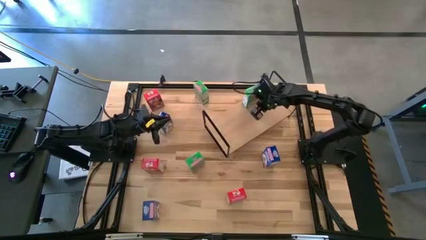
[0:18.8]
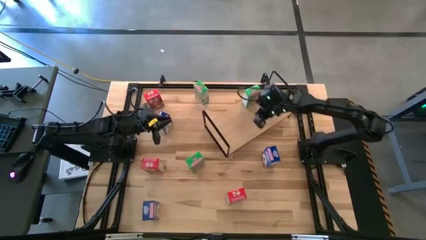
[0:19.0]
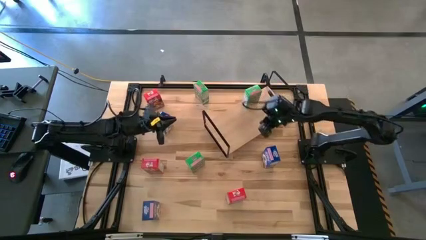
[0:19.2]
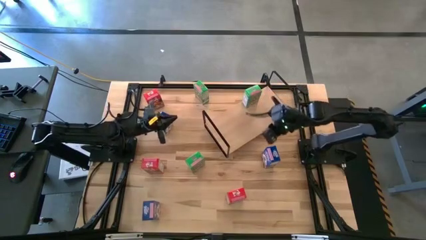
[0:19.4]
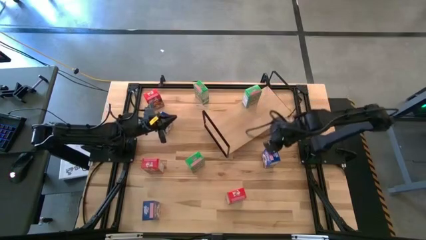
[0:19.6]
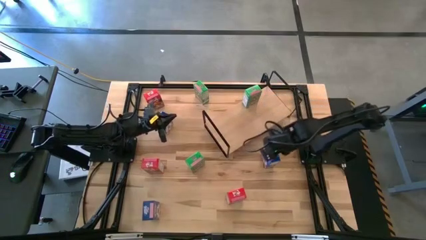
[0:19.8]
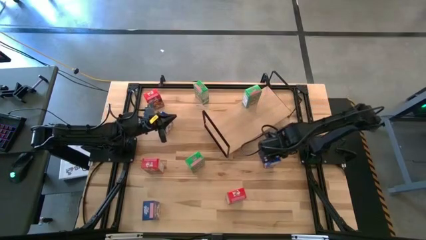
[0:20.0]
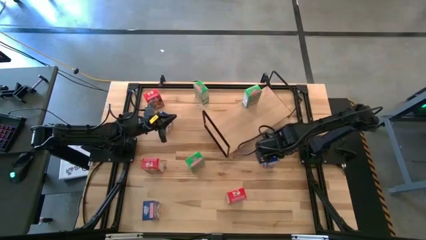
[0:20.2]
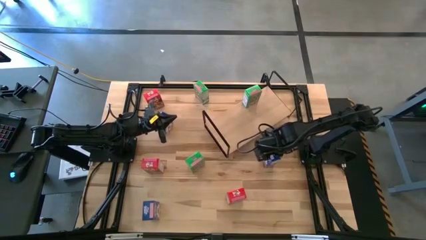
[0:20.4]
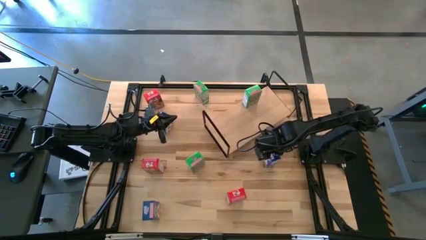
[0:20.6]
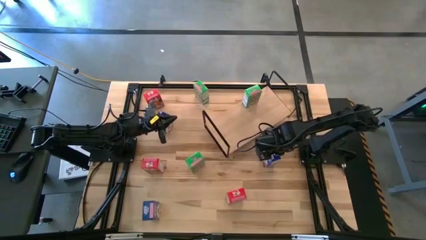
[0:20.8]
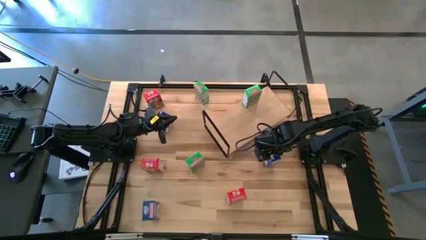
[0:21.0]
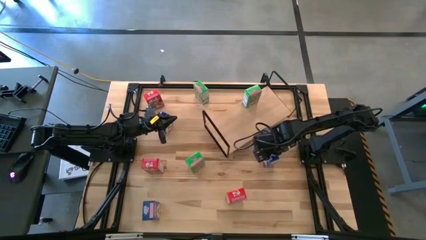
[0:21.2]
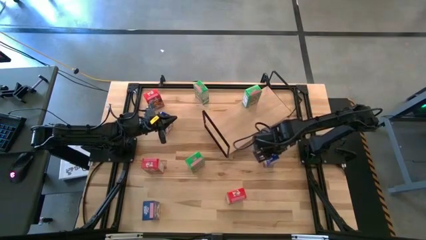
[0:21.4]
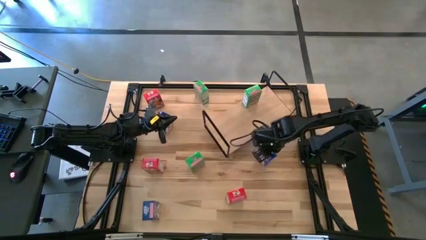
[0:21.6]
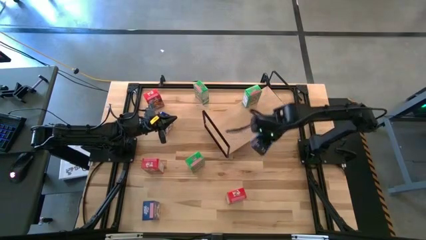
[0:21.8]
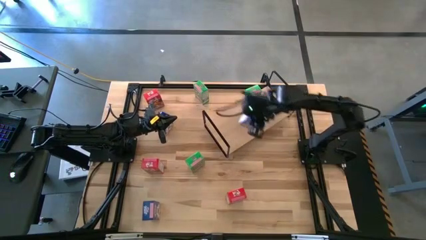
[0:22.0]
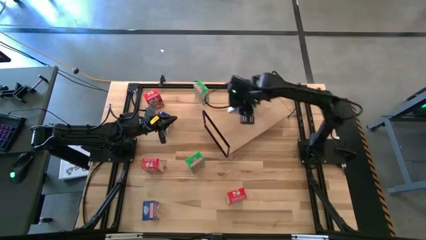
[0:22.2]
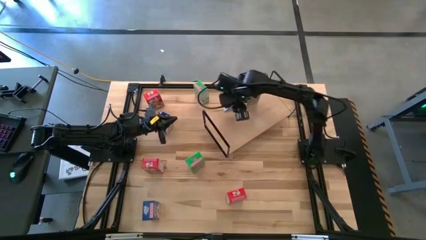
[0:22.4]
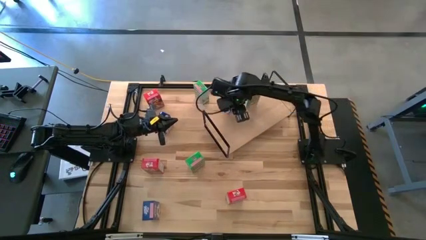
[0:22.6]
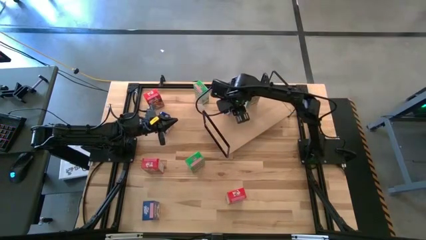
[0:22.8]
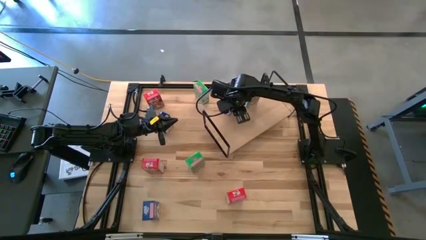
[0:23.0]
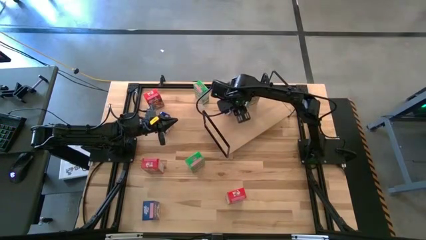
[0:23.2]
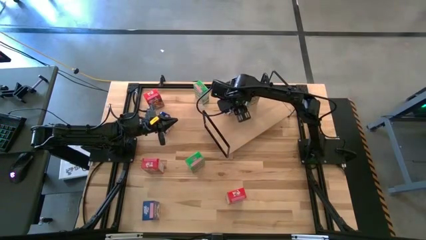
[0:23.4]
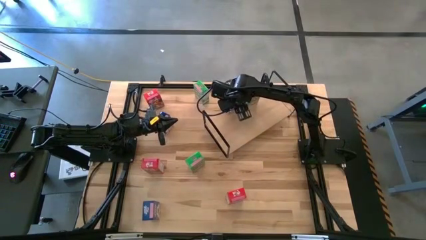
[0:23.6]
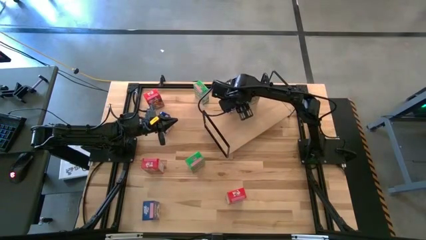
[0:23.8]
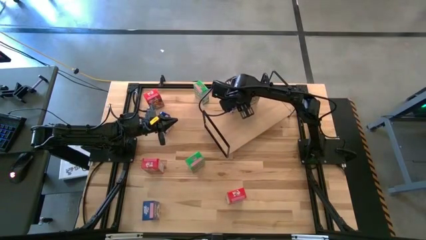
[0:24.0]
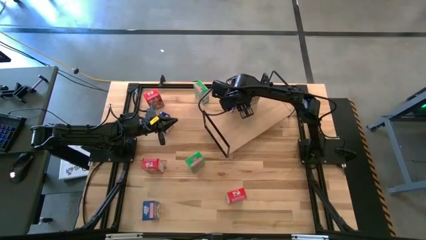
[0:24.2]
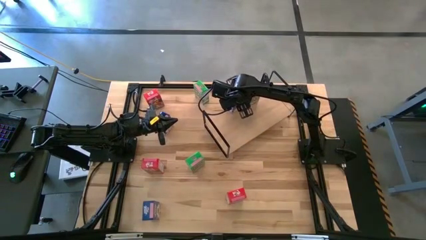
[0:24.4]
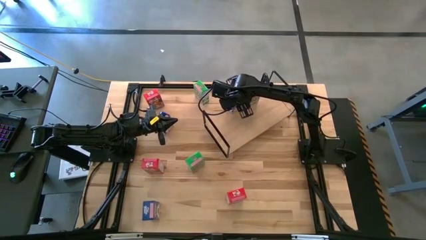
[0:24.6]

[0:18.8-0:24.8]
Task: Stack cereal on shelf
Put the middle blue cereal box on the shelf

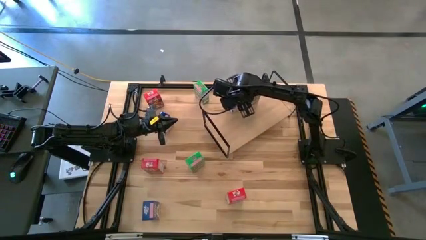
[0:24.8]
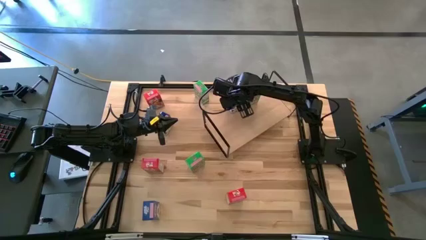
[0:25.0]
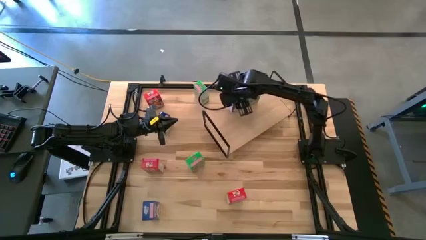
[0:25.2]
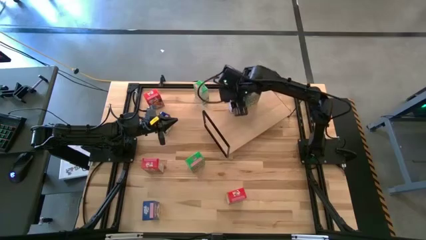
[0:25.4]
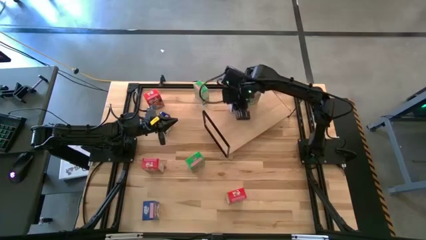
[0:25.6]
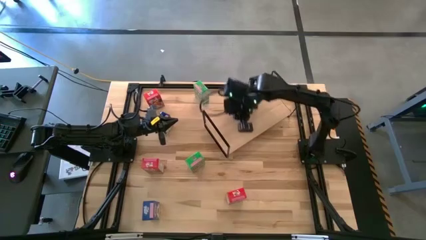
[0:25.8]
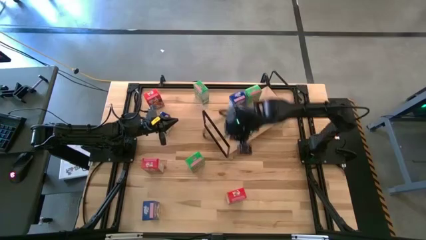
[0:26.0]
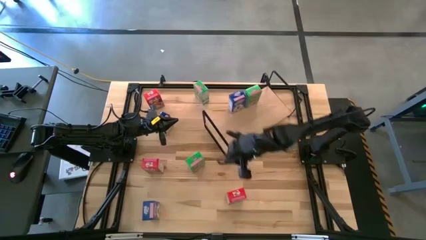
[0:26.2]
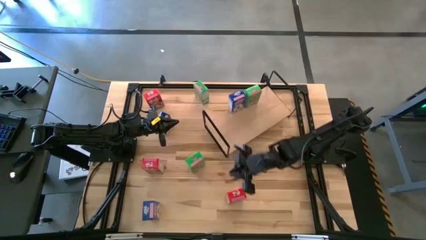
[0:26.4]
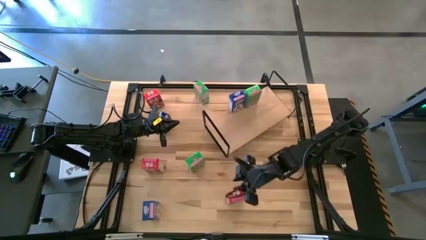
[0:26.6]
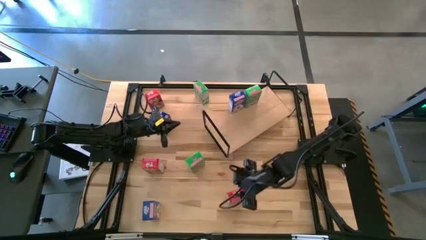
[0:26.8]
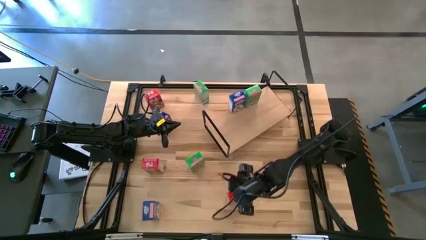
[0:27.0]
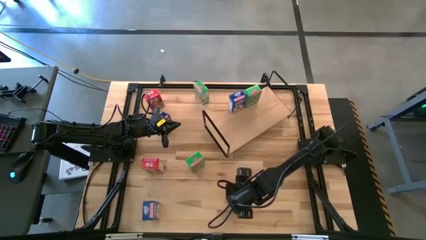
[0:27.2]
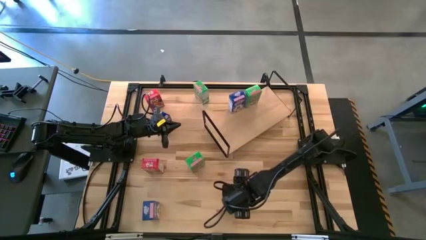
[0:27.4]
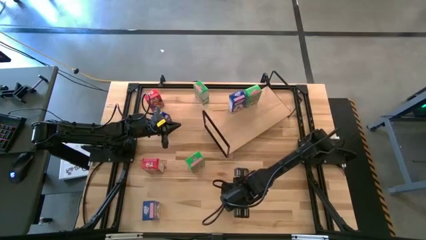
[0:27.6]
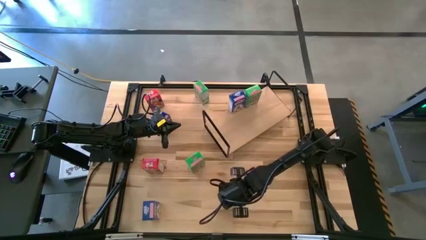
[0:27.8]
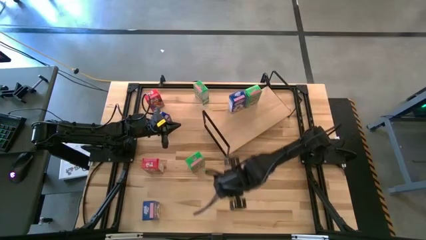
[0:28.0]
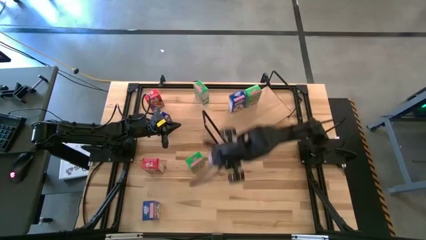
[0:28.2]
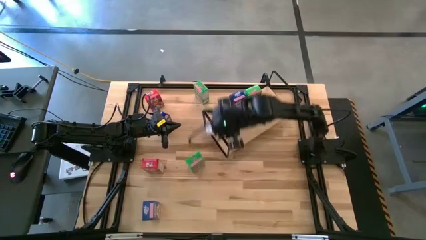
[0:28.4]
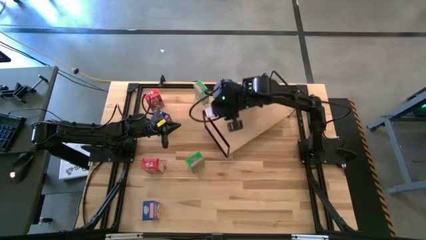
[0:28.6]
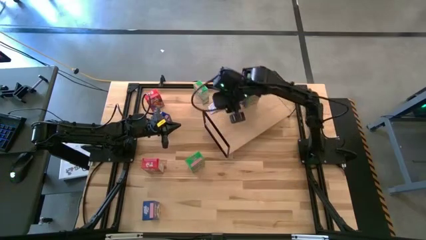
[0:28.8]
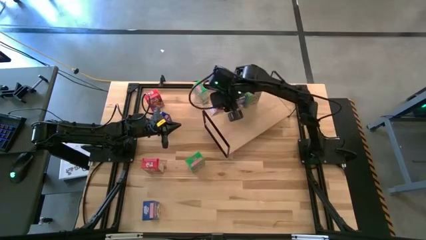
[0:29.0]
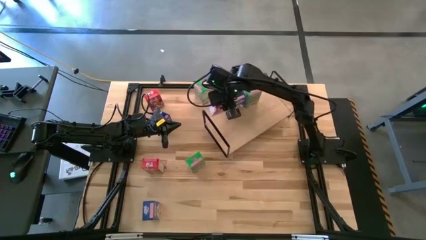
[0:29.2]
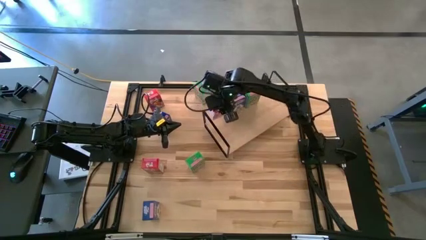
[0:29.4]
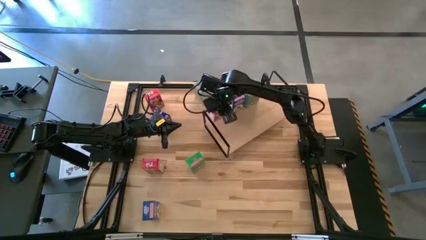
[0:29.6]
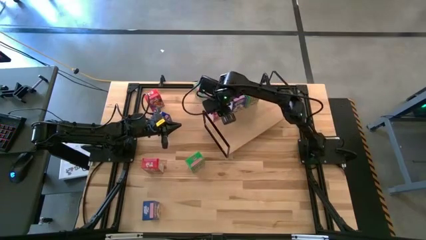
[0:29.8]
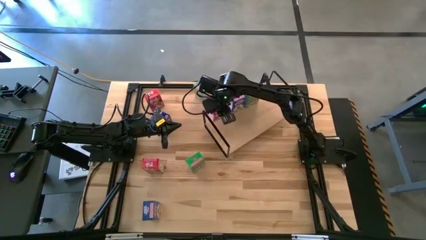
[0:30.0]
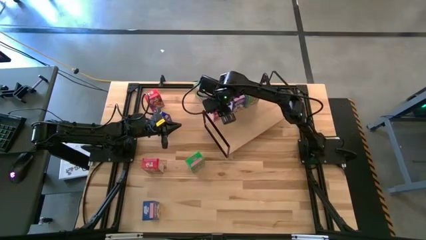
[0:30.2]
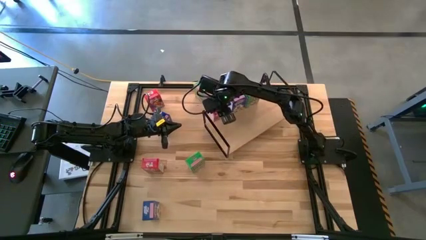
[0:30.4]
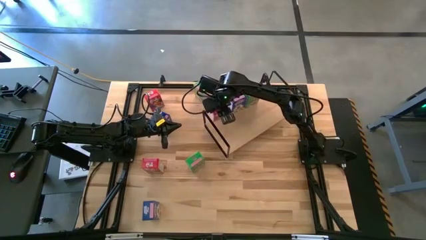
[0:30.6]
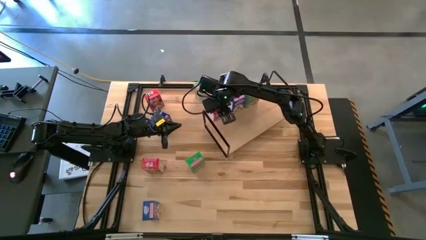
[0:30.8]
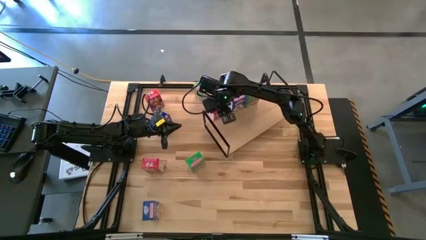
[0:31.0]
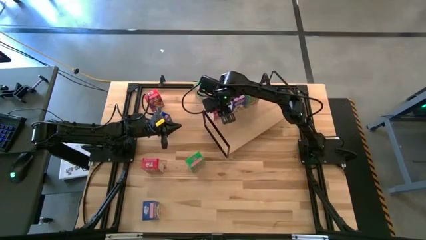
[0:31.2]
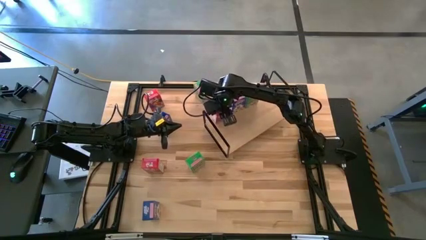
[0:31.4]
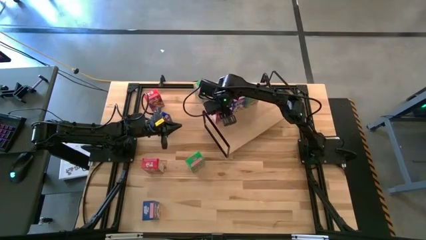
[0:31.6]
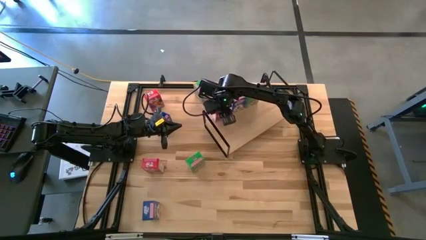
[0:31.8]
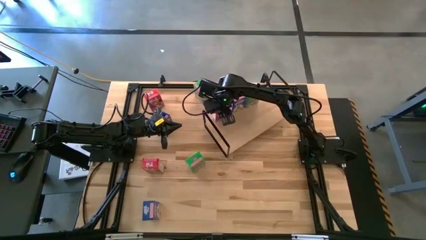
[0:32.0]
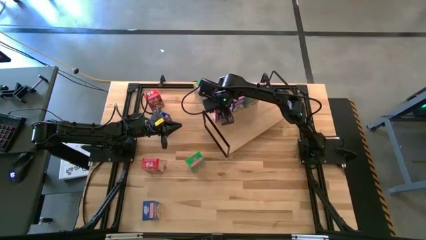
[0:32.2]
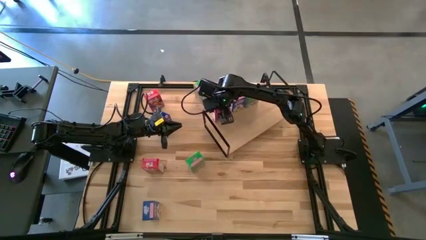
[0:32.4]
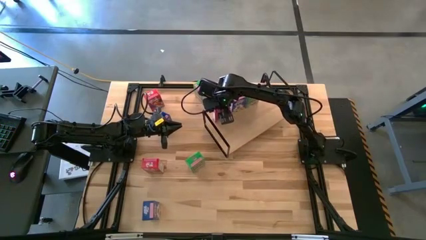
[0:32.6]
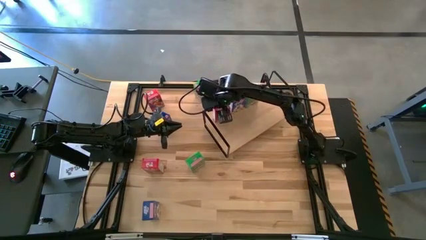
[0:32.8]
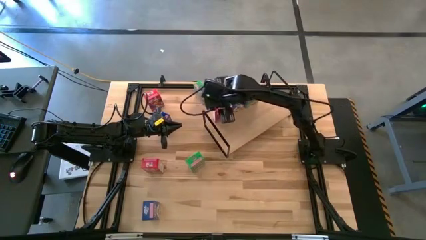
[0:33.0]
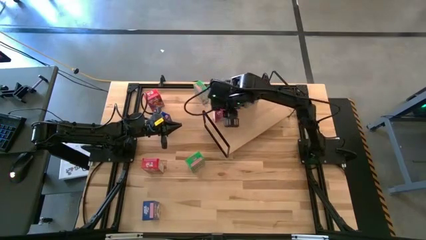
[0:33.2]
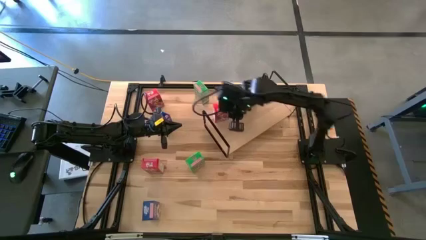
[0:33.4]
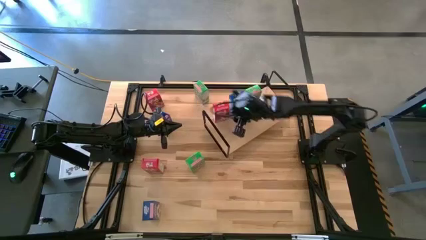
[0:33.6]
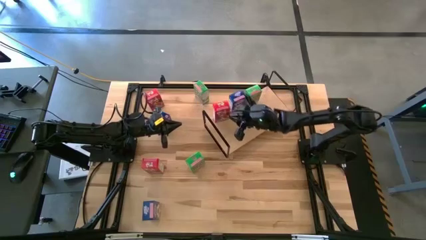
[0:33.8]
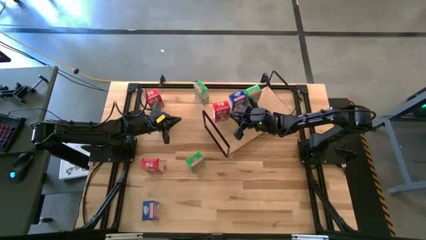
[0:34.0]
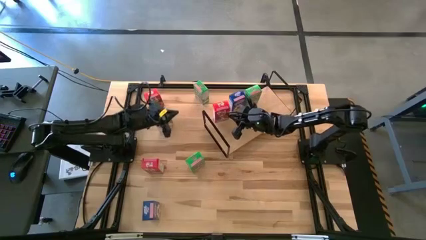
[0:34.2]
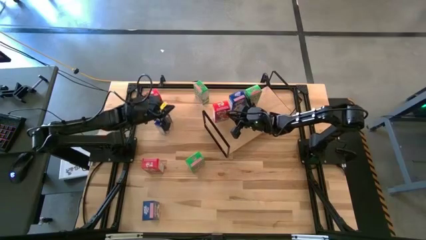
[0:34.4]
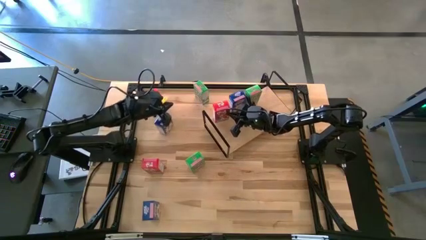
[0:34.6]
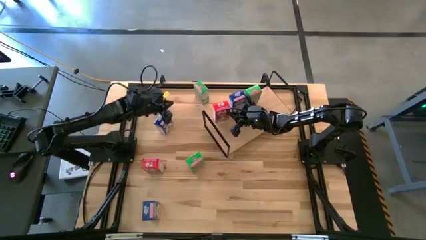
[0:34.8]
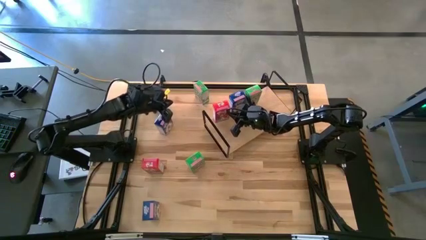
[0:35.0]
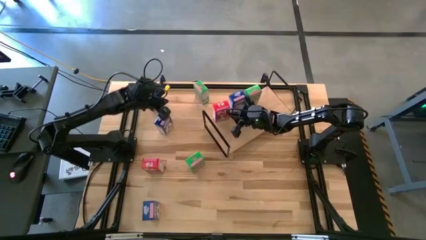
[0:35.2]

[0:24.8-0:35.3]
Put the bottom red cereal box on the shelf
